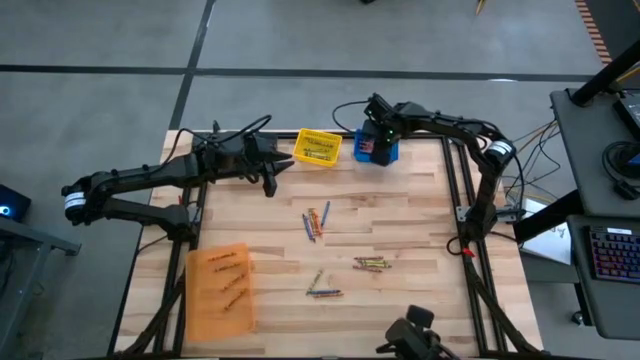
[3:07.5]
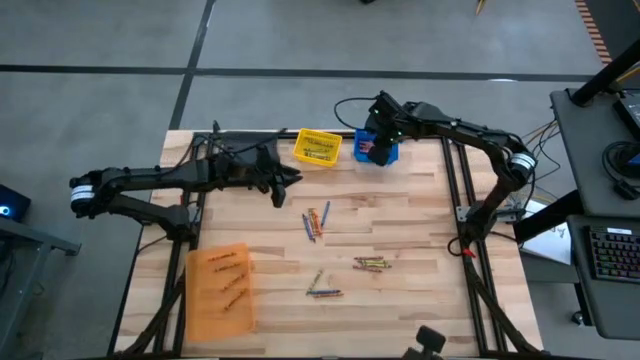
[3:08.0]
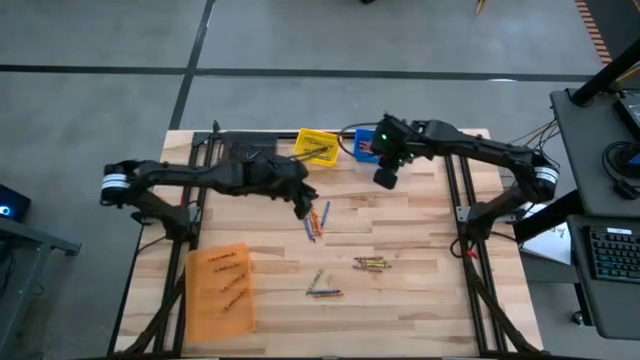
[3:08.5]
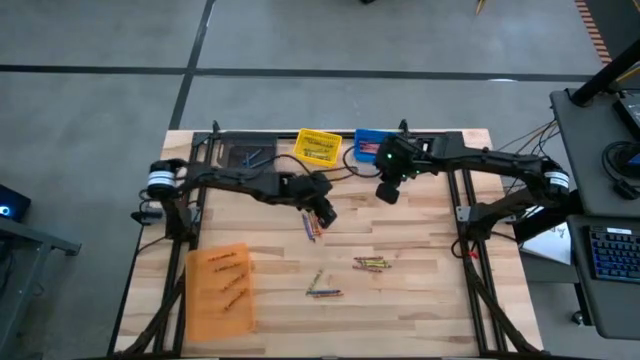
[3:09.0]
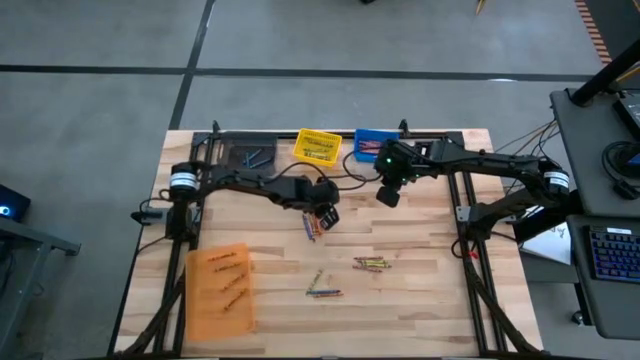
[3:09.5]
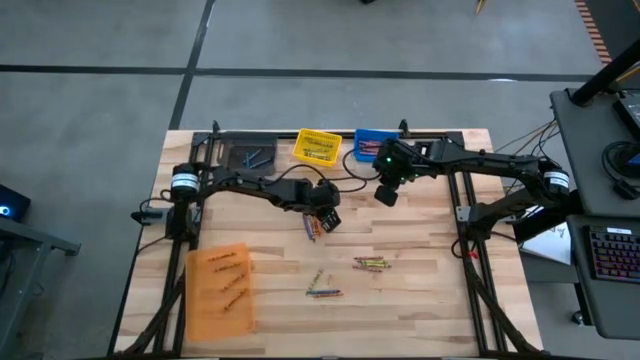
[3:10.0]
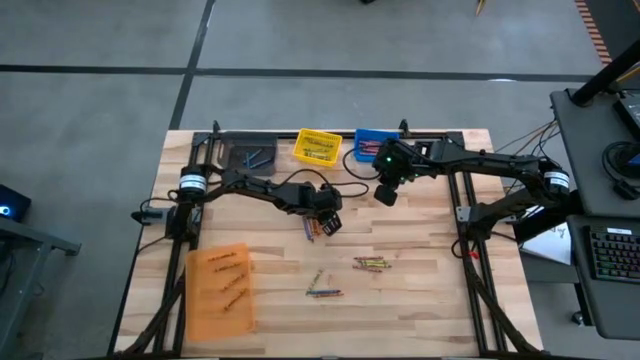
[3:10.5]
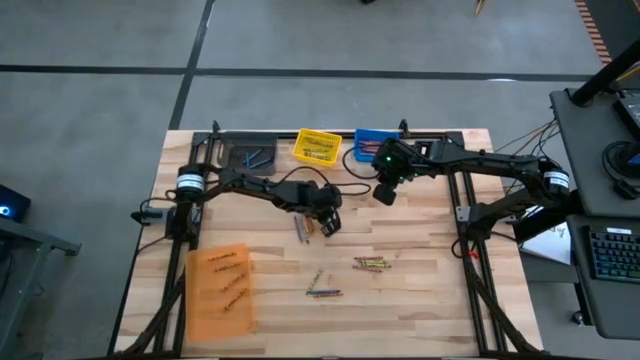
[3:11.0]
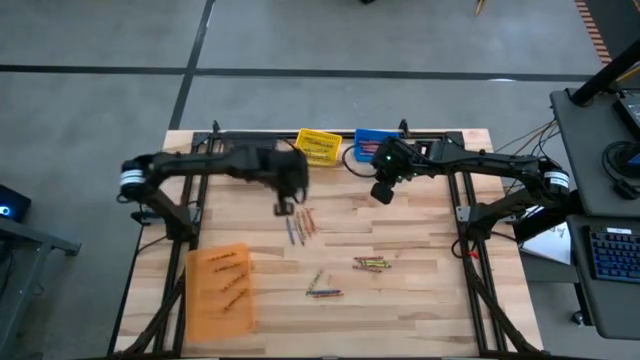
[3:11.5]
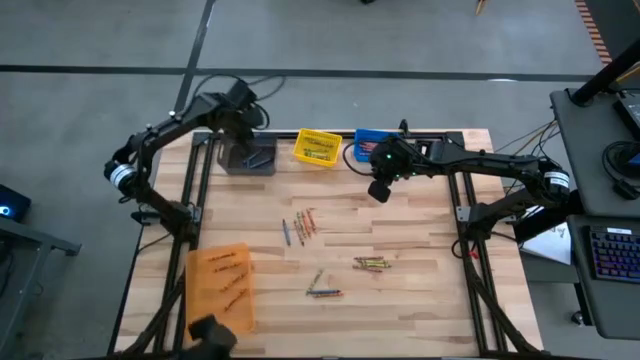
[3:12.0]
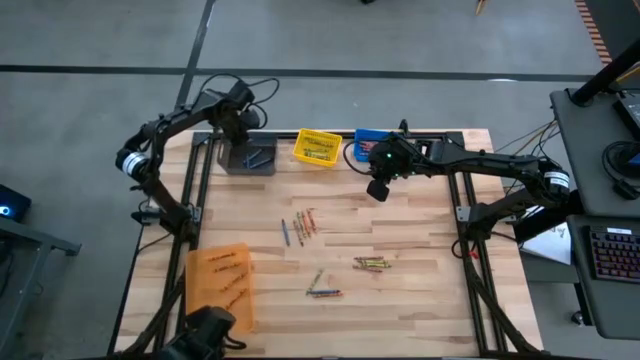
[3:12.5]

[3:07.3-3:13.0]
Task: Sort crayons
Put the blue crayon into the black bin

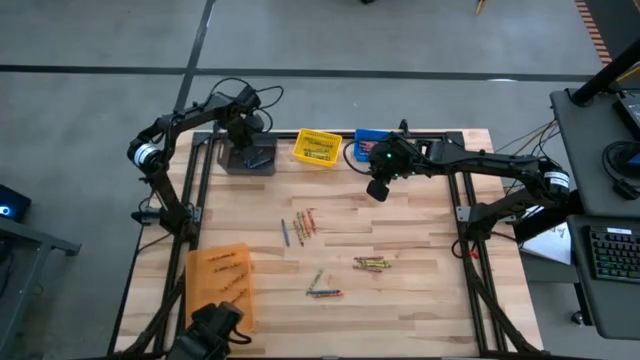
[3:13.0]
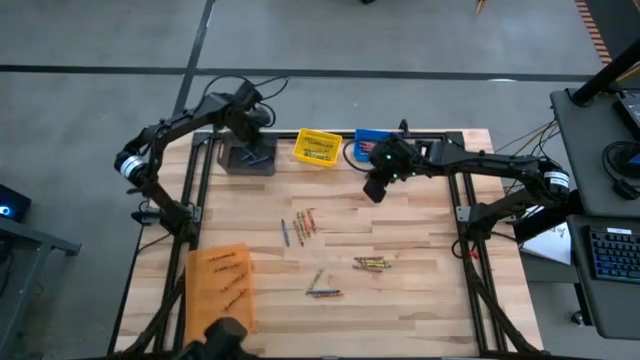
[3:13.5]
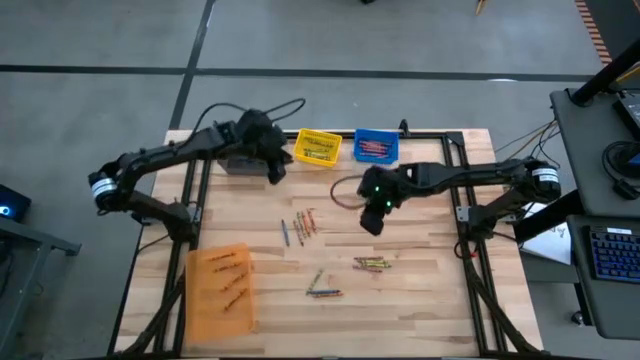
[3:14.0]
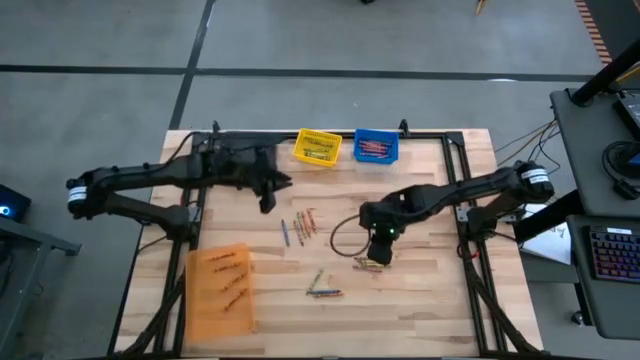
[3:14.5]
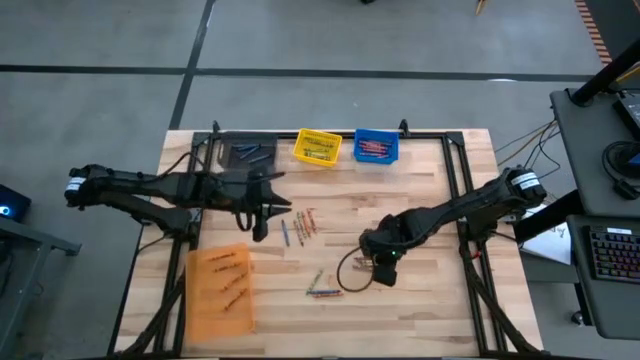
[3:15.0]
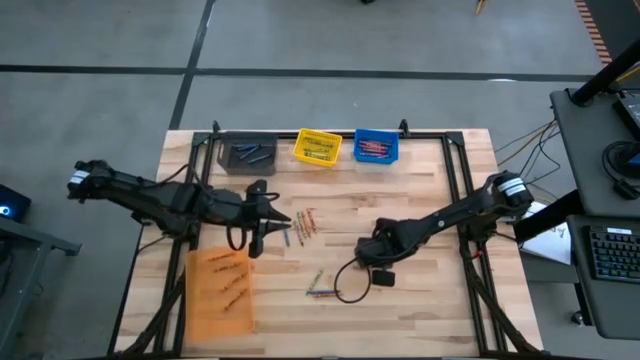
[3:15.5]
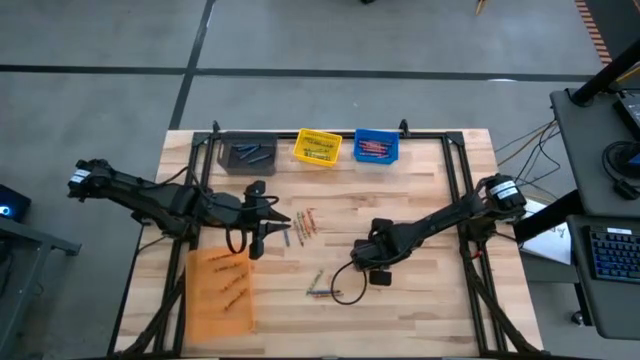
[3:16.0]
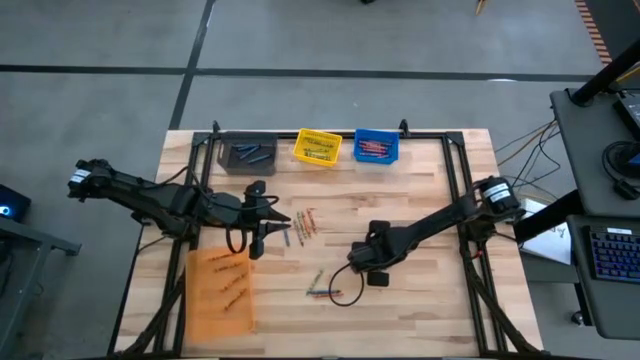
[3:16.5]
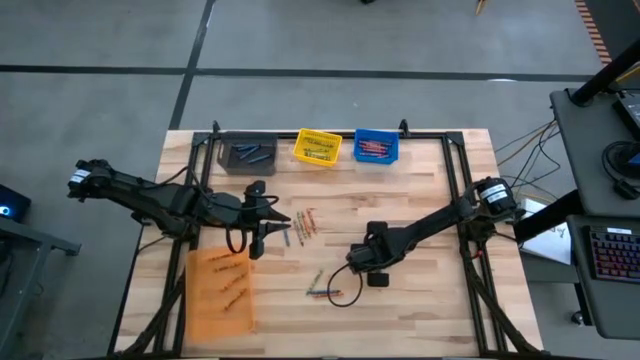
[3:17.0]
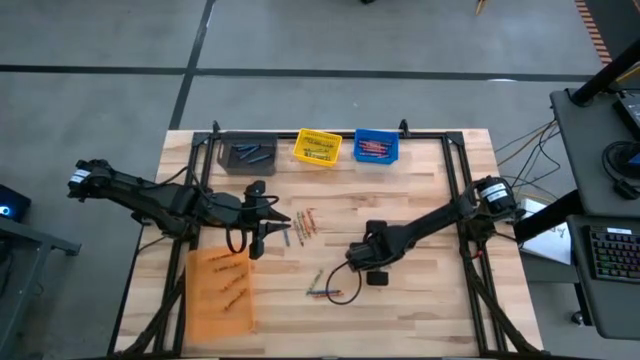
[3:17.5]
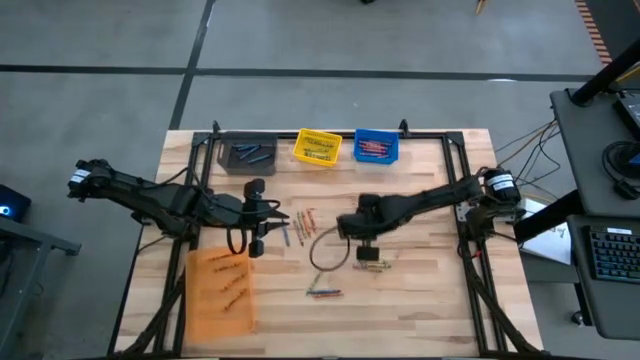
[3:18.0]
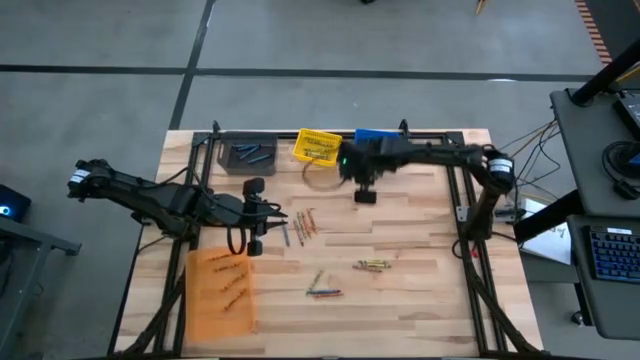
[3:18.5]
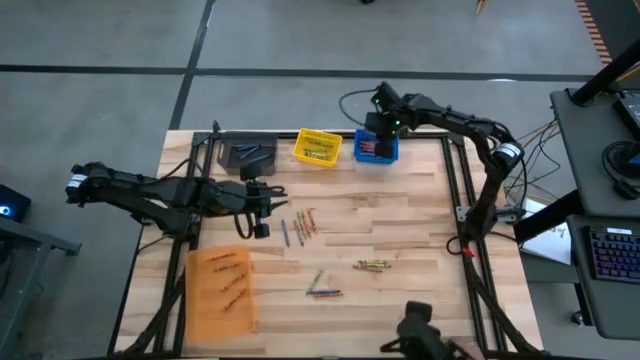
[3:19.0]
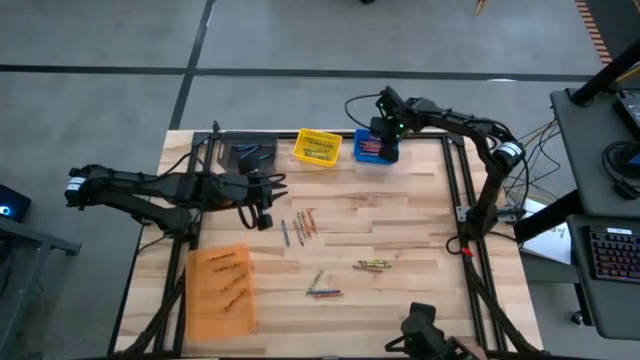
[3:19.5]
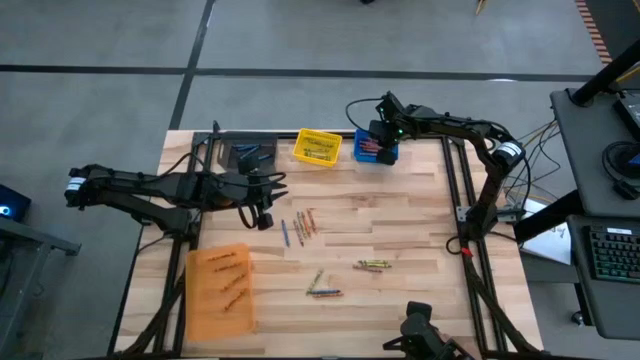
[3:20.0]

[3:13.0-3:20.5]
Put the red crayon into the blue bin

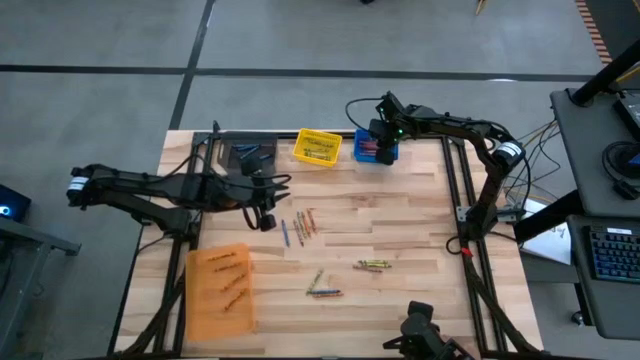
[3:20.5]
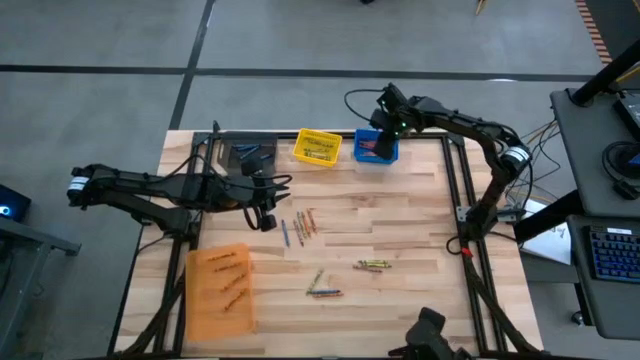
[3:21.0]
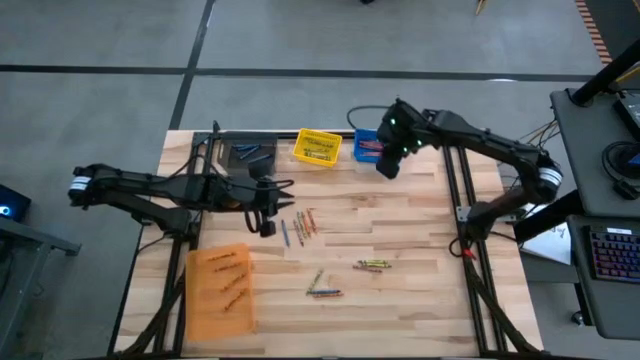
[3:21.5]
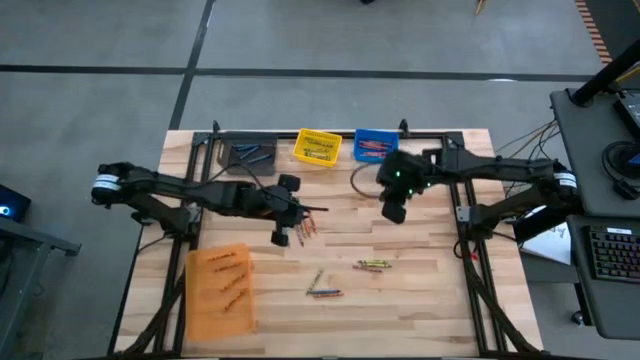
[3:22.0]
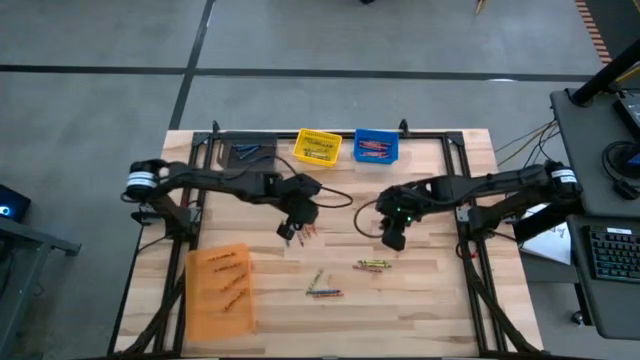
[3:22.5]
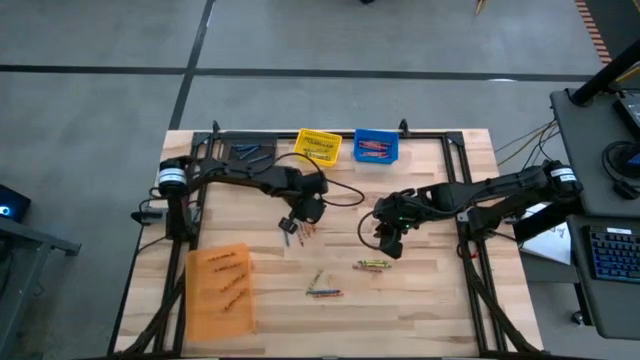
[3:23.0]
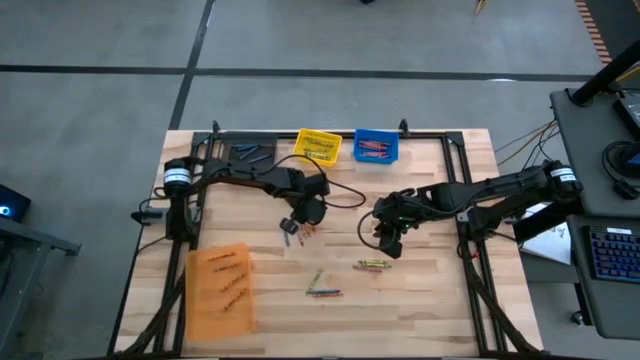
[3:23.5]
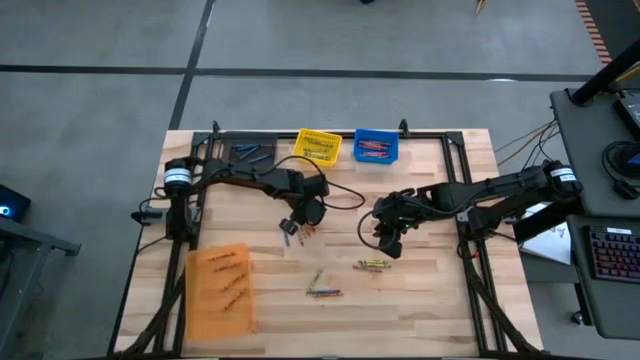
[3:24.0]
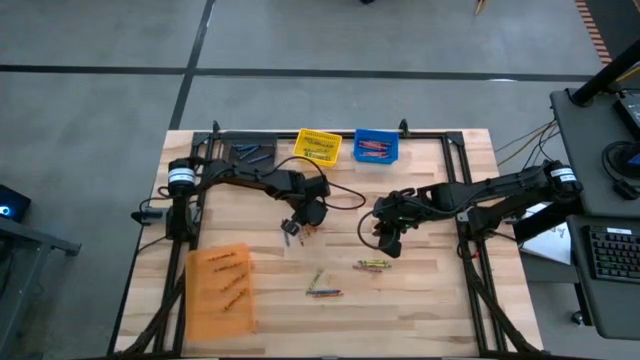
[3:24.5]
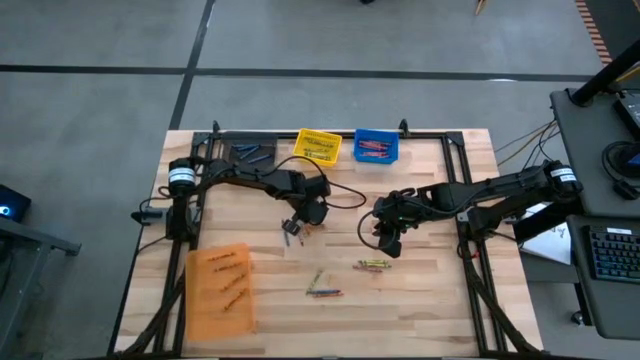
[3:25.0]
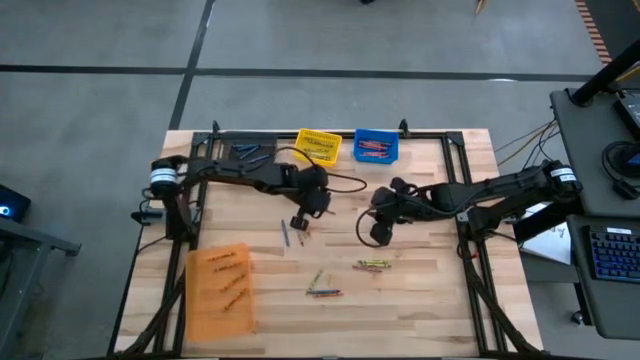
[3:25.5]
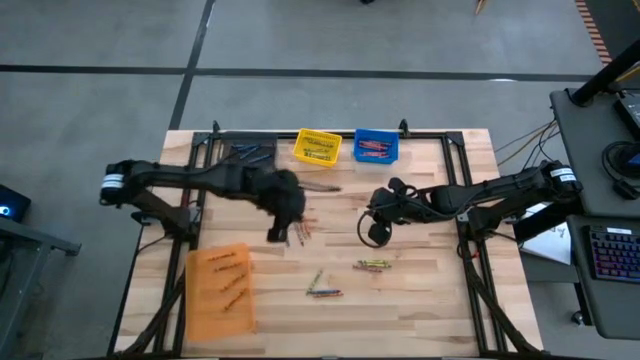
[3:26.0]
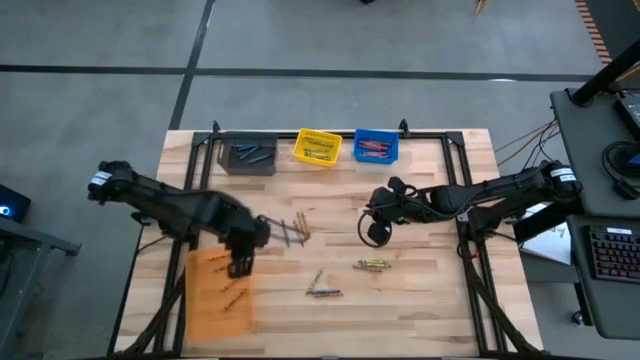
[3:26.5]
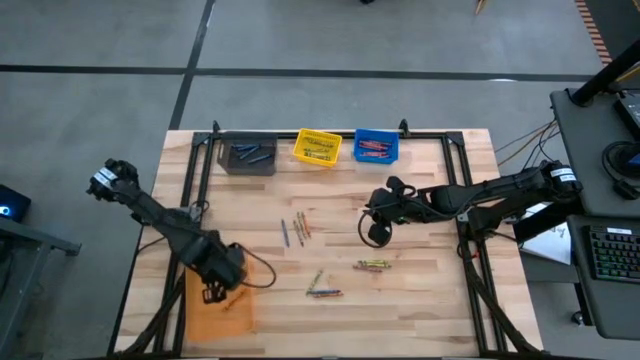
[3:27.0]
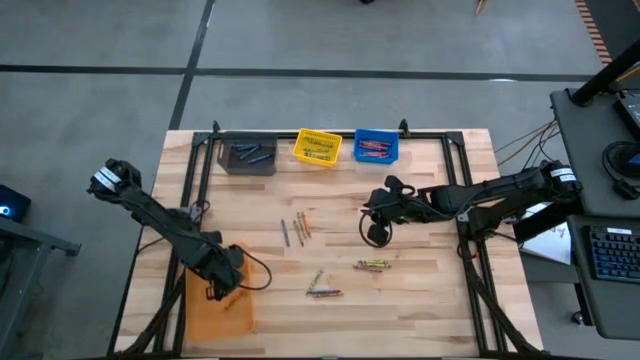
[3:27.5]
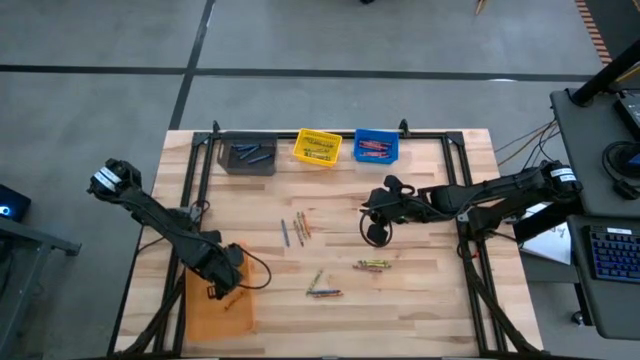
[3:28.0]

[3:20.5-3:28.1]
Put the orange crayon into the orange bin

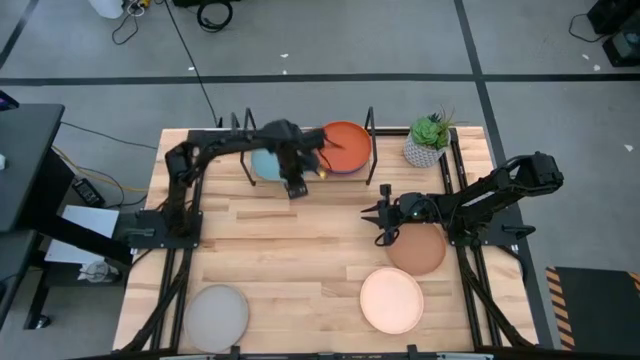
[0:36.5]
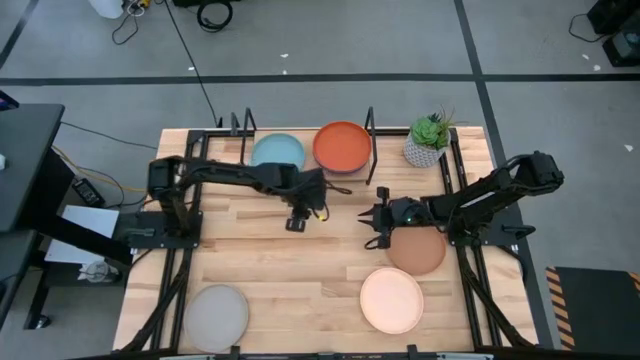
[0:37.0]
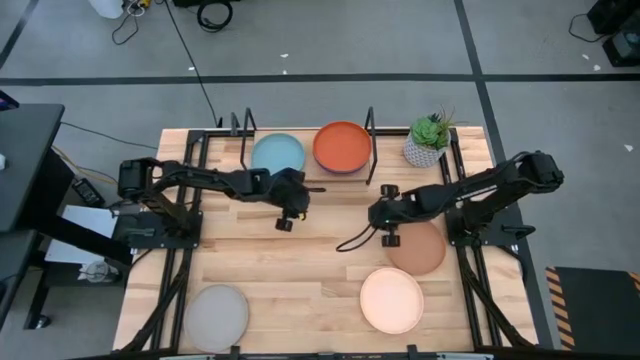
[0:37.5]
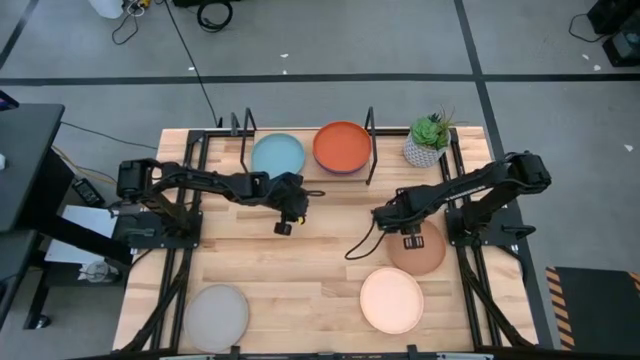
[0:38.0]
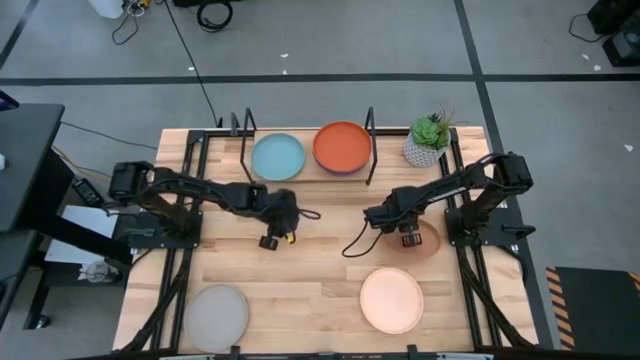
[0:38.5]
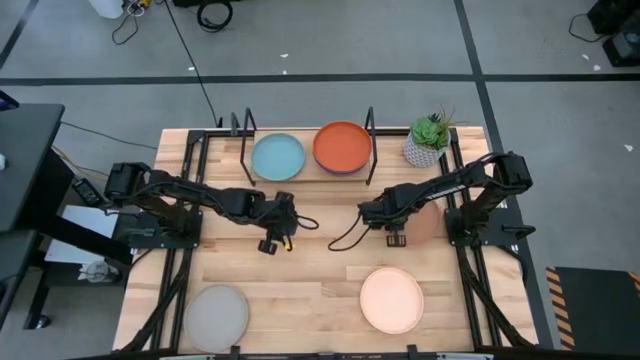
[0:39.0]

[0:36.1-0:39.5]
Task: Place and stack plates onto a shelf
Stack the brown plate on top of the light blue plate on the shelf
